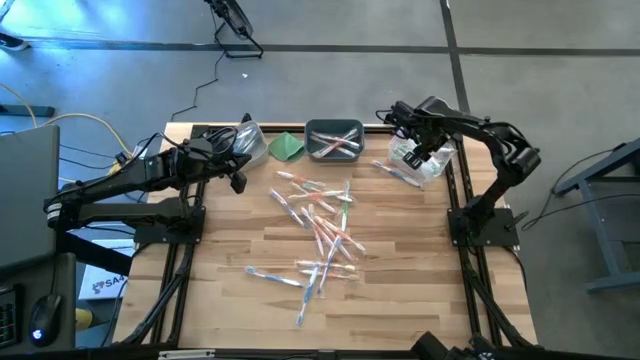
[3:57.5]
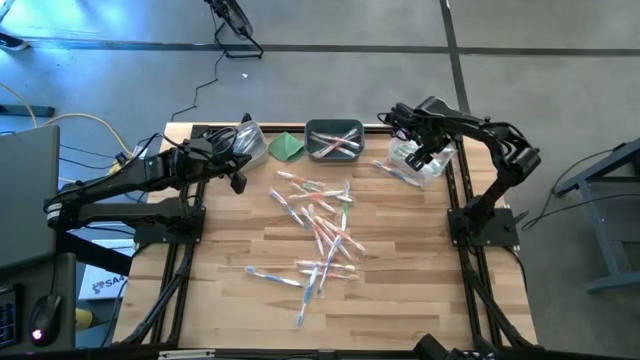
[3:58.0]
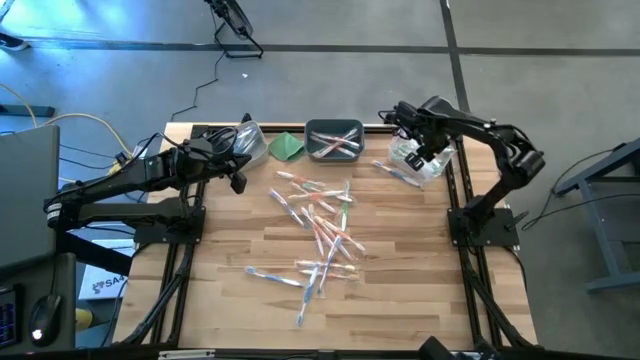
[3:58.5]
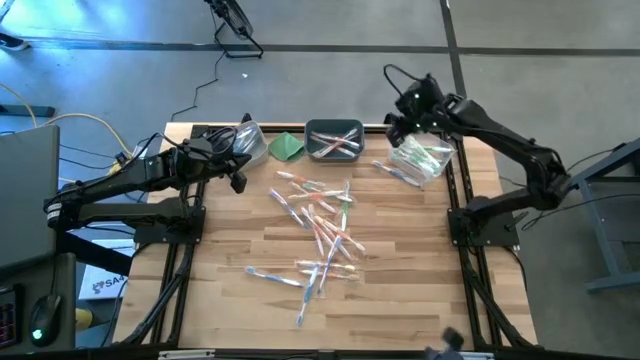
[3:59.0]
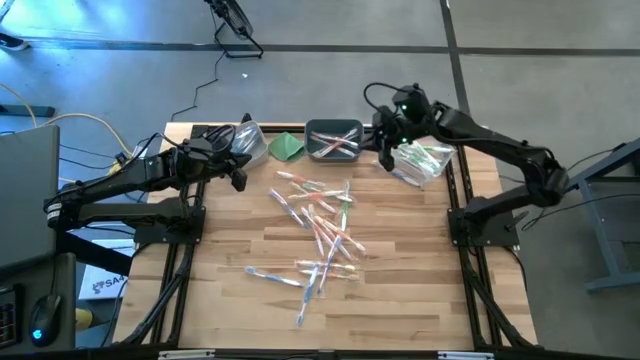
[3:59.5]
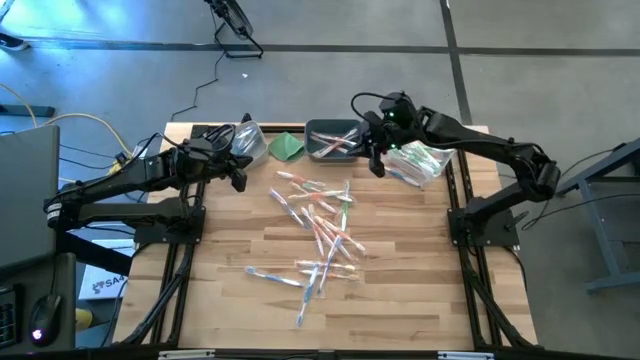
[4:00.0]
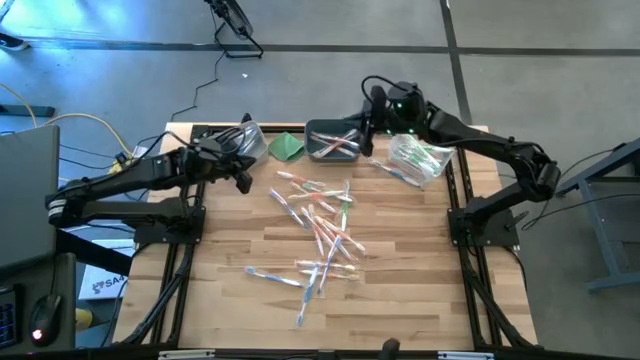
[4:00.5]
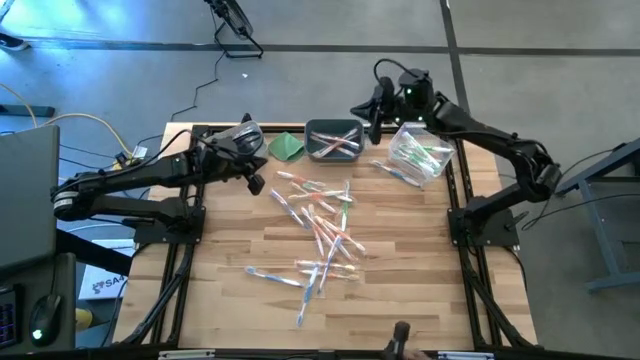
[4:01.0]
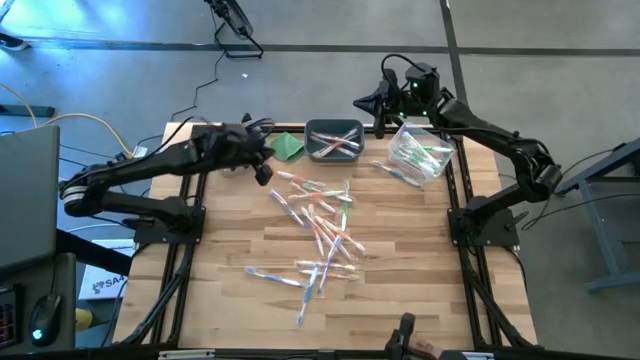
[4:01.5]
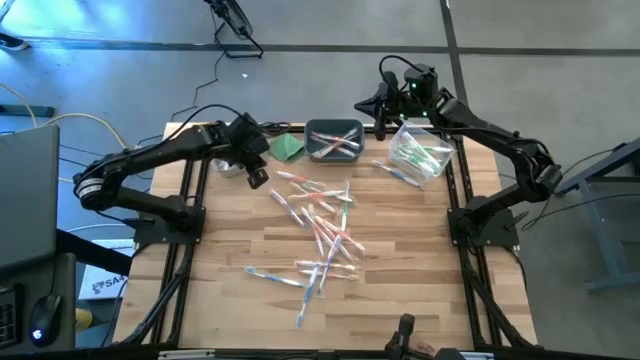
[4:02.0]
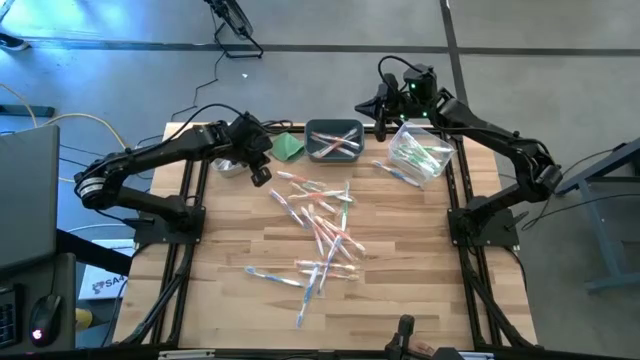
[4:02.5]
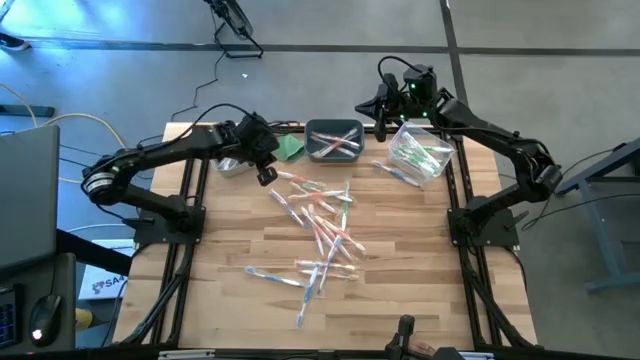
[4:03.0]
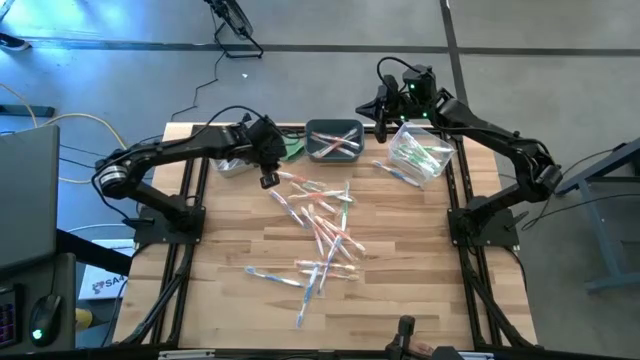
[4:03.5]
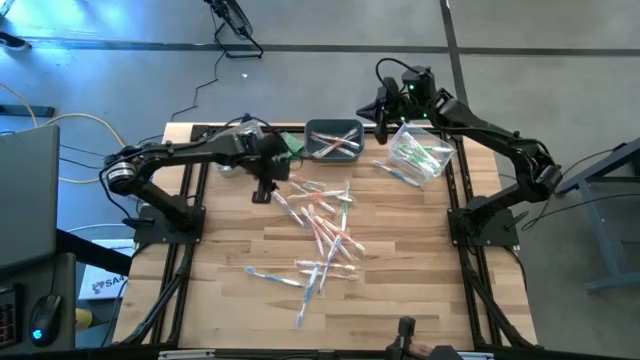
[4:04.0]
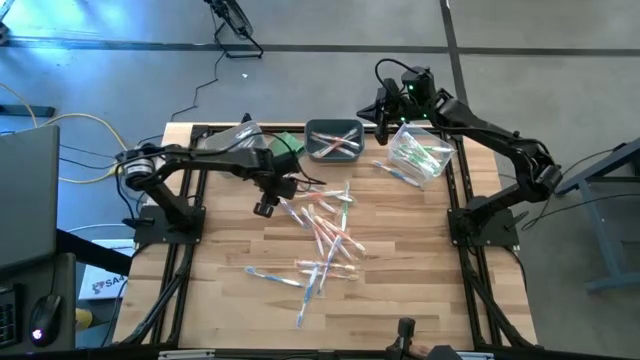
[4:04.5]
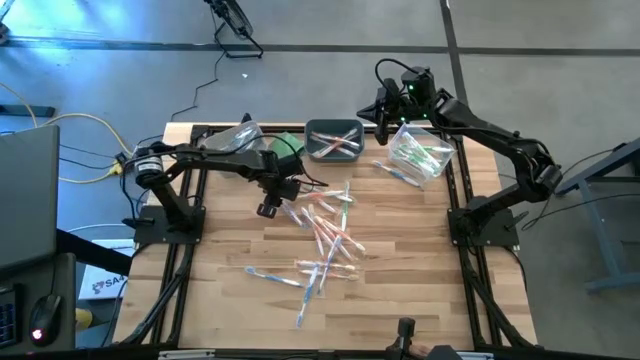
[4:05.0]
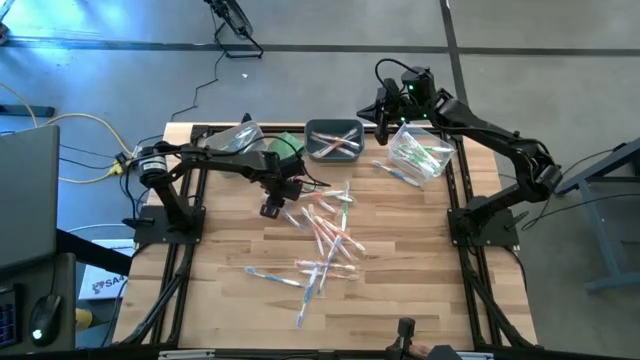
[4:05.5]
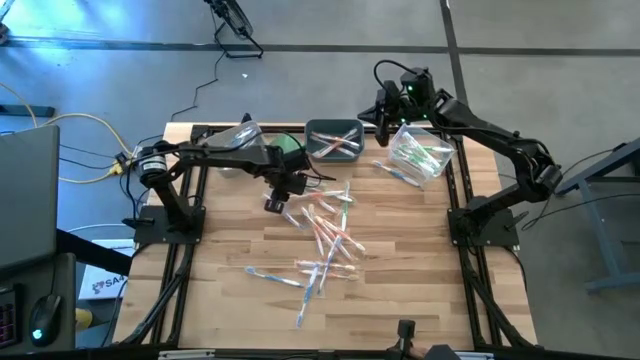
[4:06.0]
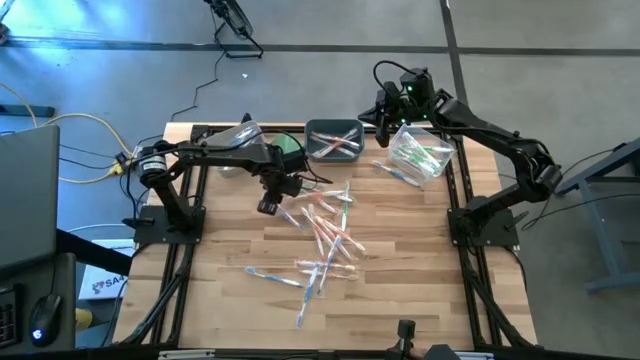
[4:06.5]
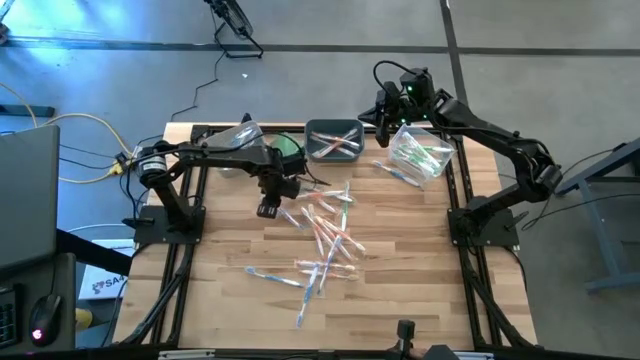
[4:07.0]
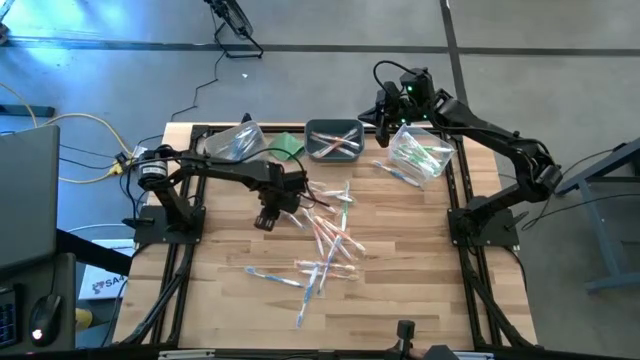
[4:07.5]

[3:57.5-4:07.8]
Task: Pick & Place Toothbrushes
Put the blue toothbrush into the gray bin

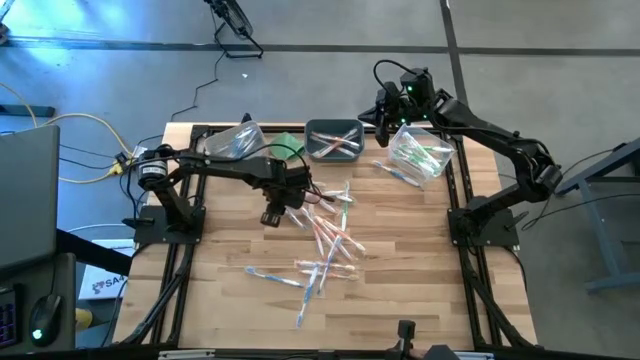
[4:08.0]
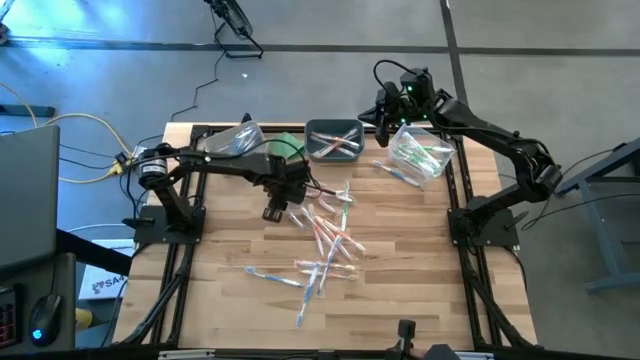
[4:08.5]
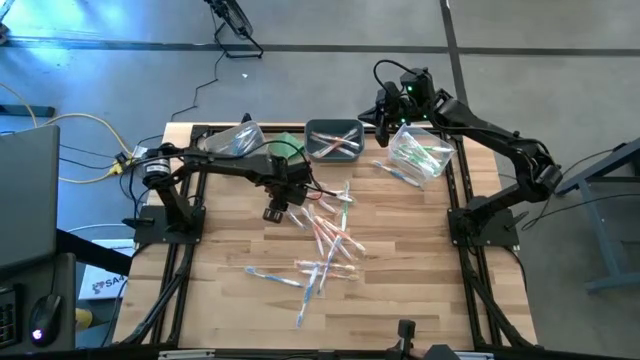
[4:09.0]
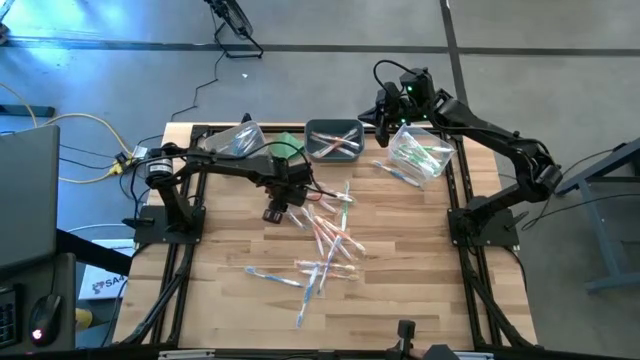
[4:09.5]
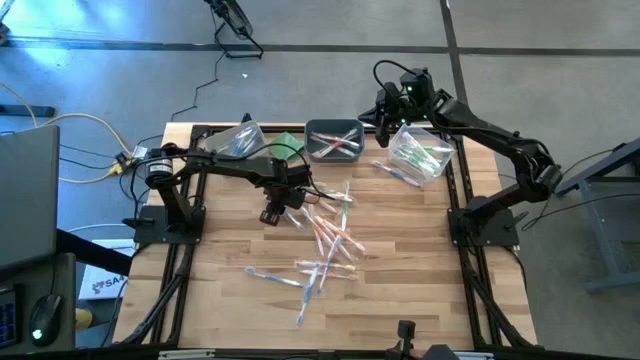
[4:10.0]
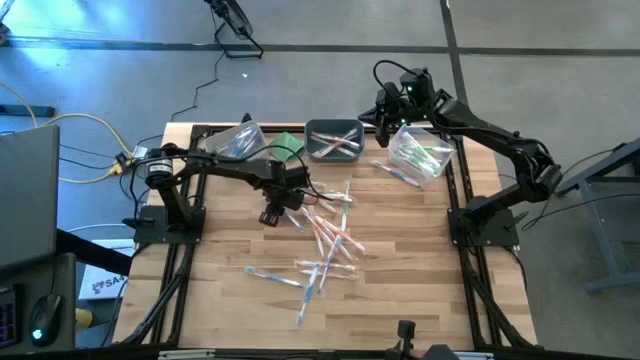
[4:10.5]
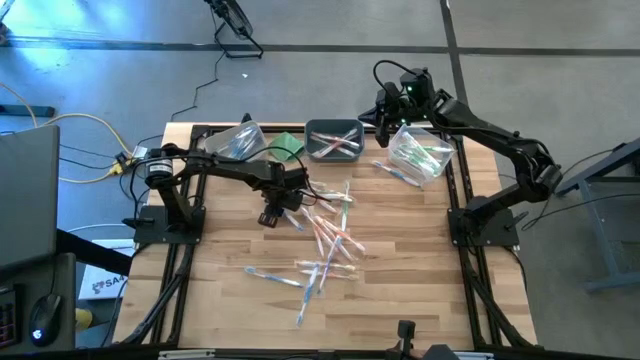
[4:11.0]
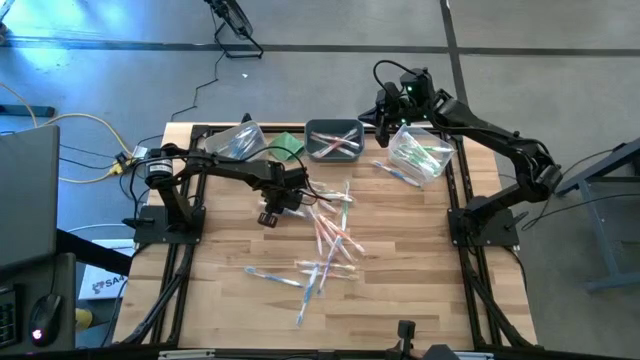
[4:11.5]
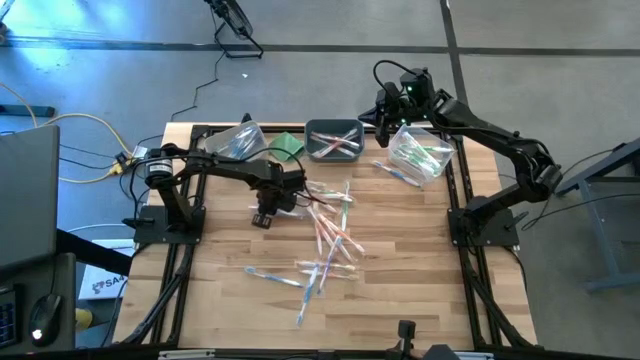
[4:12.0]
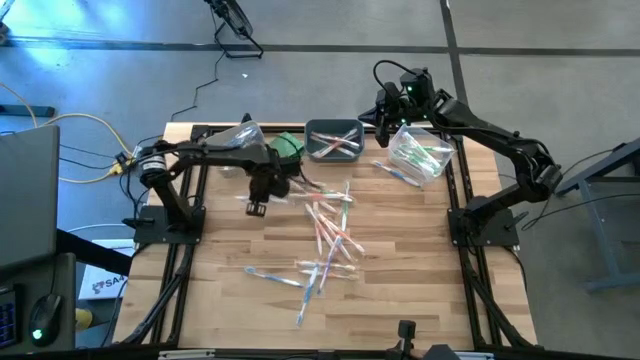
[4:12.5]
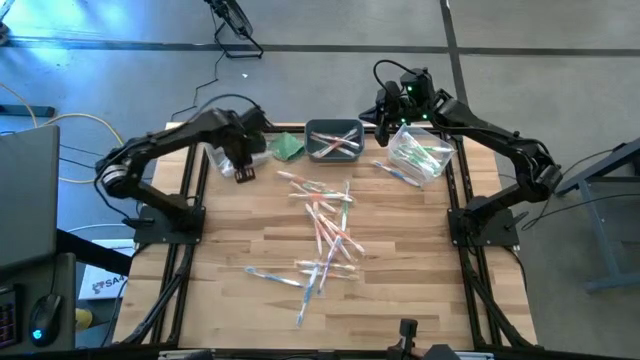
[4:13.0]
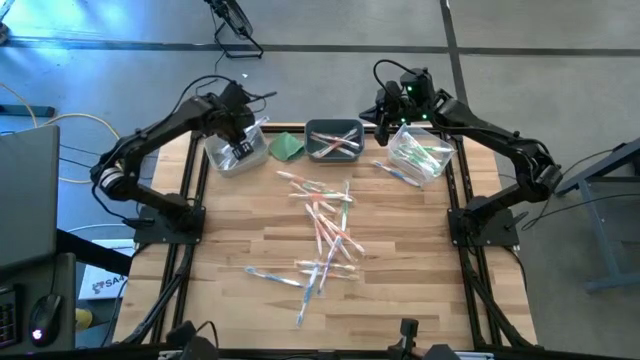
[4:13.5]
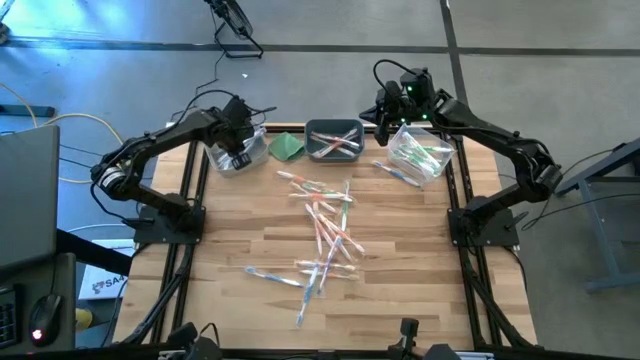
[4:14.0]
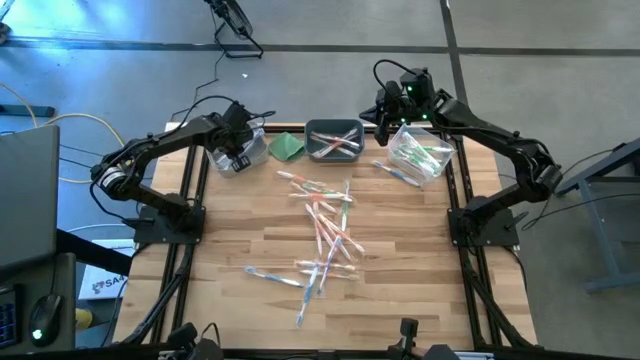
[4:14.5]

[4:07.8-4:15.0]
Put the blue toothbrush into the gray bin

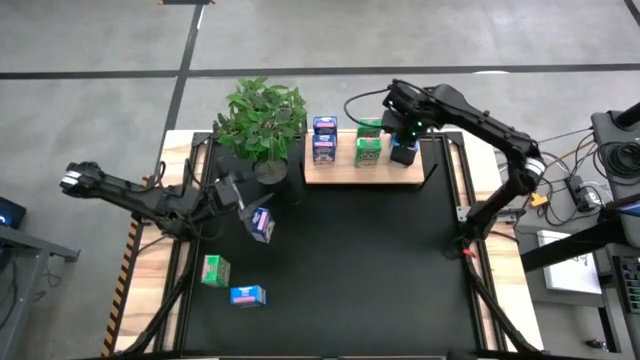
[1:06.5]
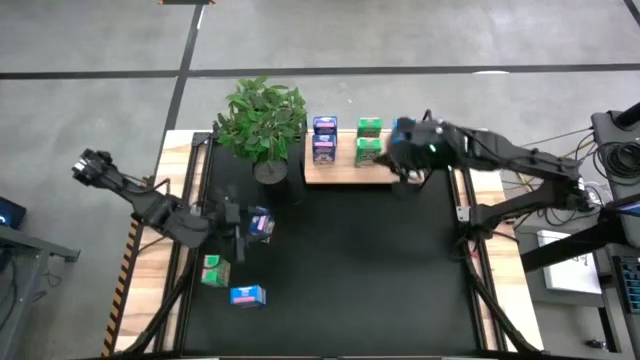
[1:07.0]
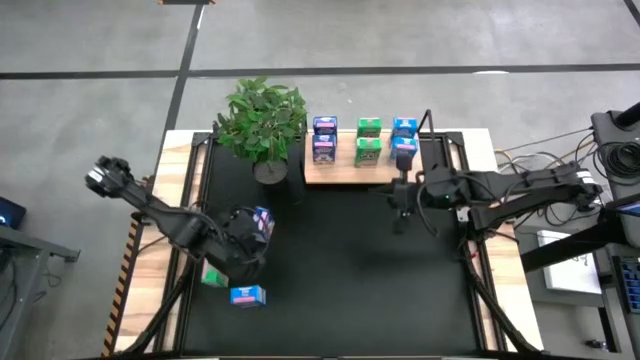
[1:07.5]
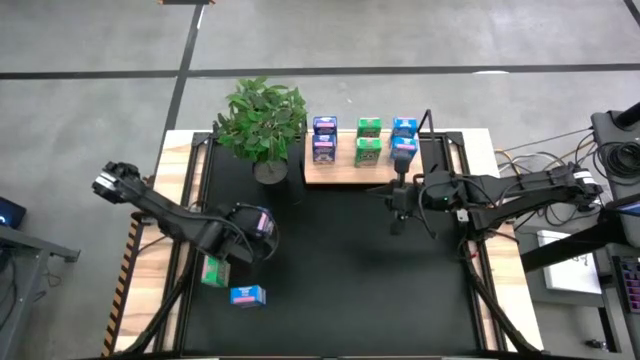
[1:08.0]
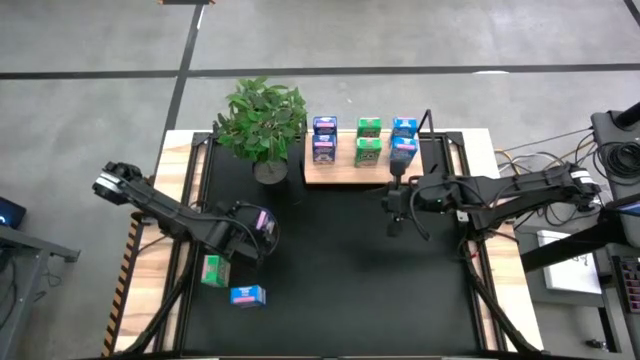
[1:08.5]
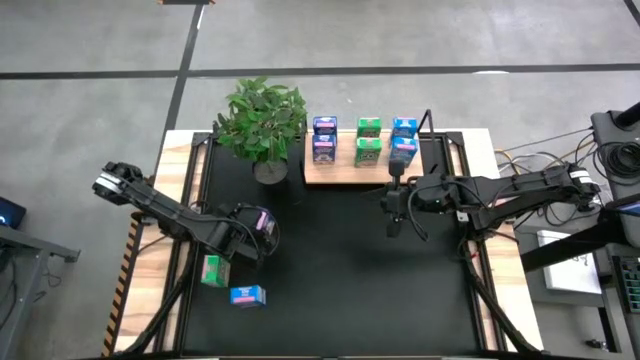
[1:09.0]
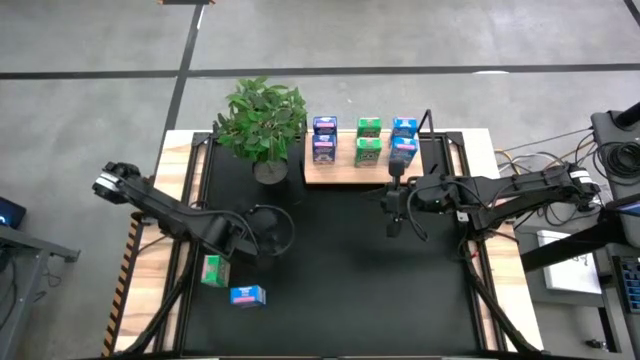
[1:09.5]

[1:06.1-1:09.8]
Task: Stack cereal on shelf
Put the dark blue cereal box on the shelf aligned with the other dark blue cereal boxes
